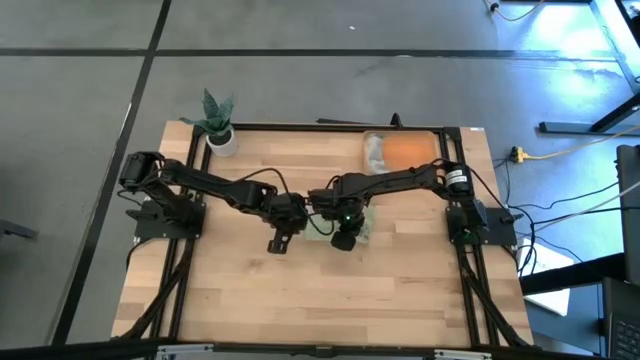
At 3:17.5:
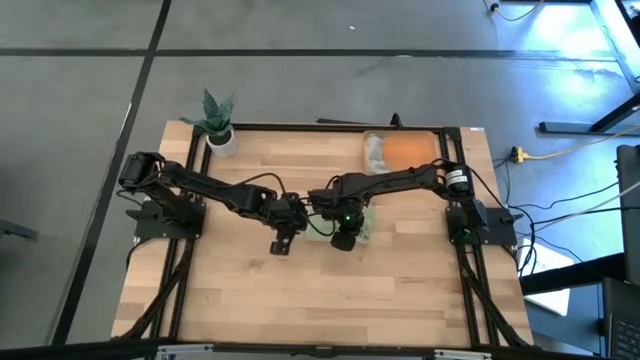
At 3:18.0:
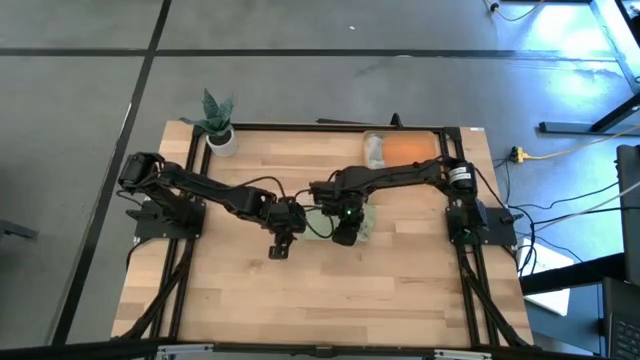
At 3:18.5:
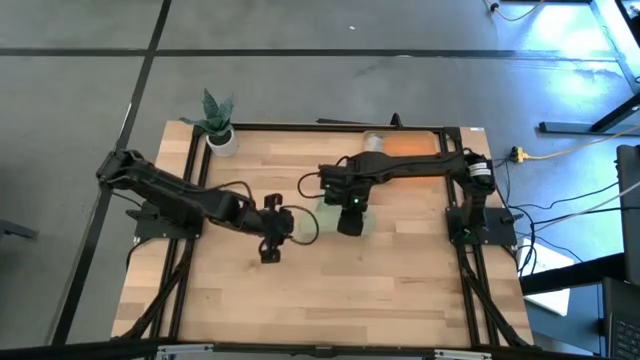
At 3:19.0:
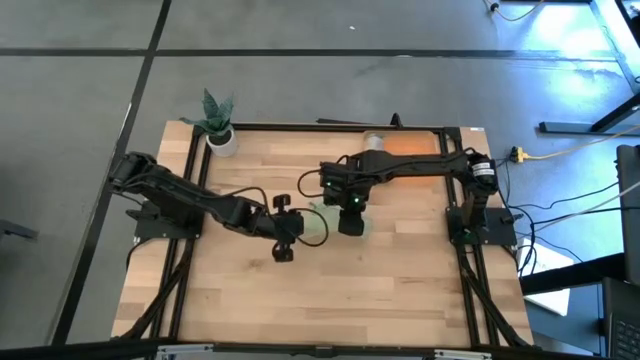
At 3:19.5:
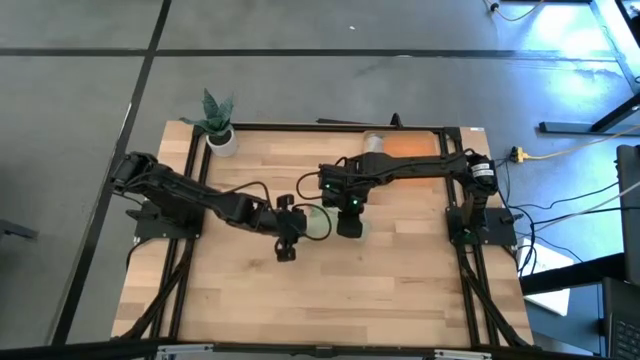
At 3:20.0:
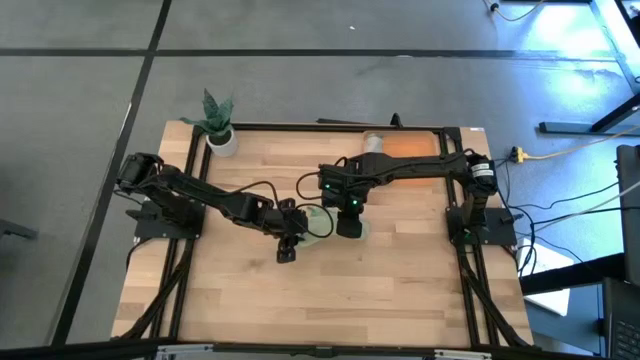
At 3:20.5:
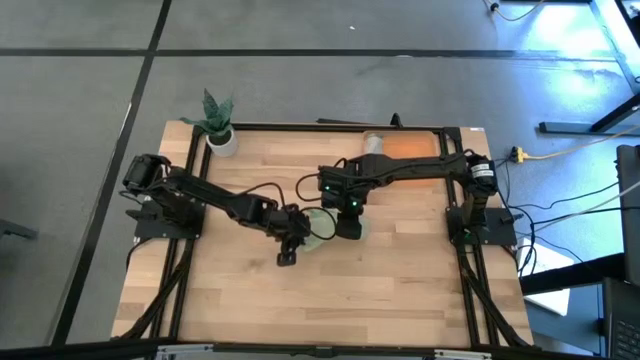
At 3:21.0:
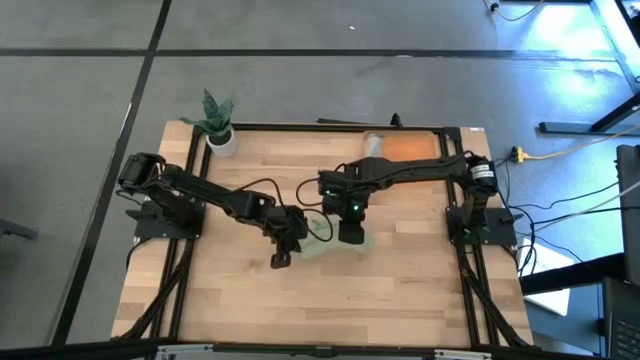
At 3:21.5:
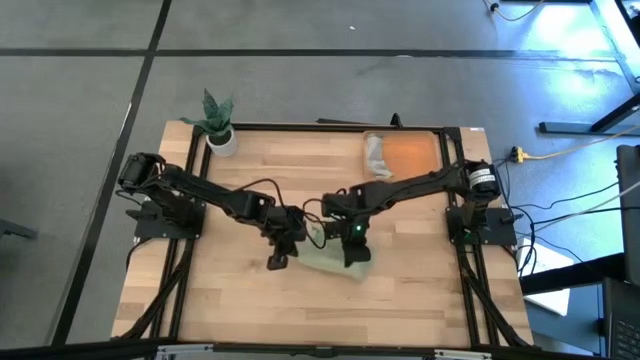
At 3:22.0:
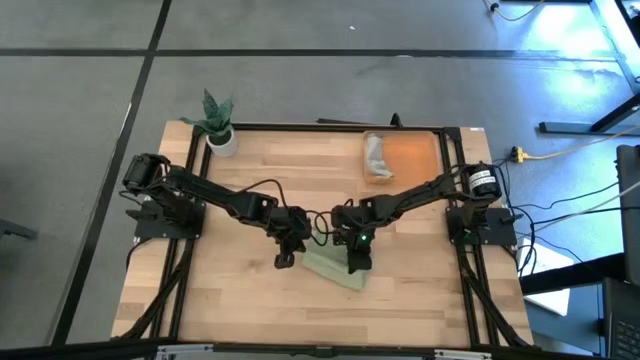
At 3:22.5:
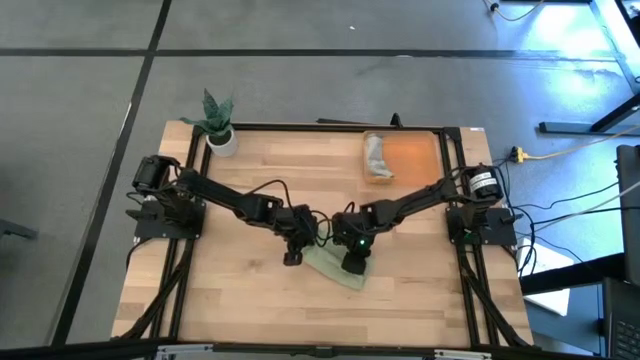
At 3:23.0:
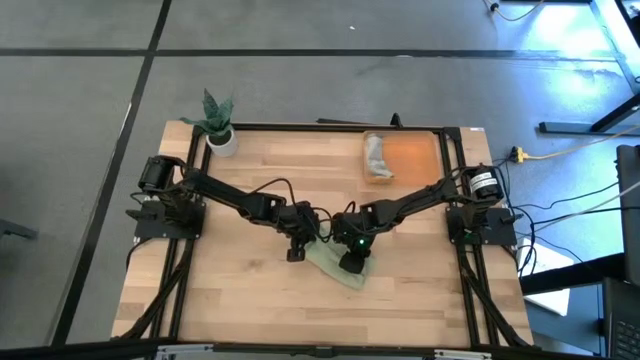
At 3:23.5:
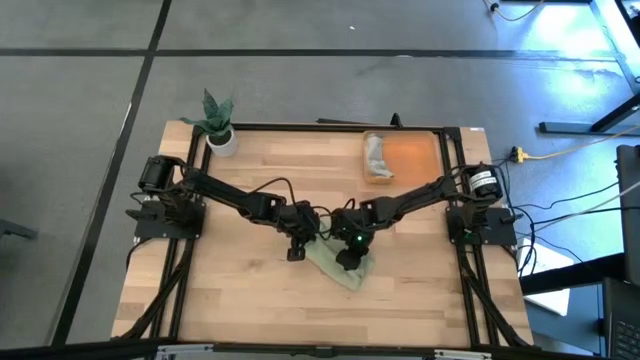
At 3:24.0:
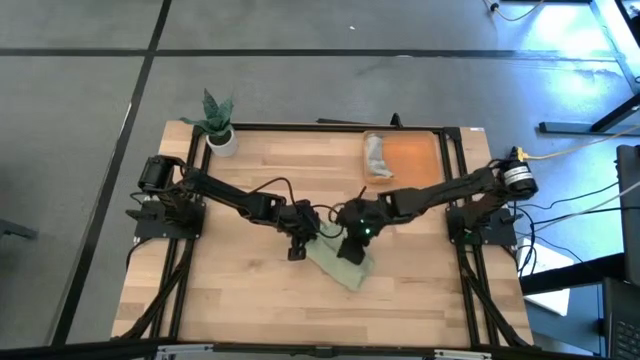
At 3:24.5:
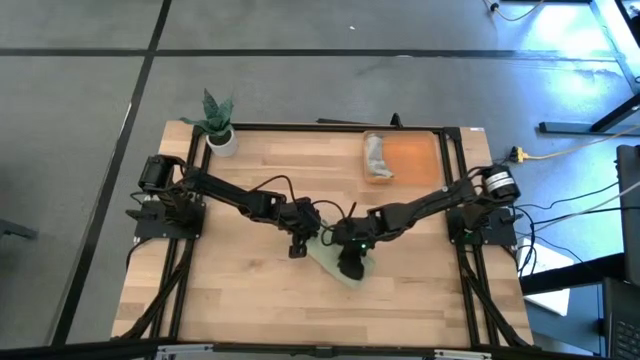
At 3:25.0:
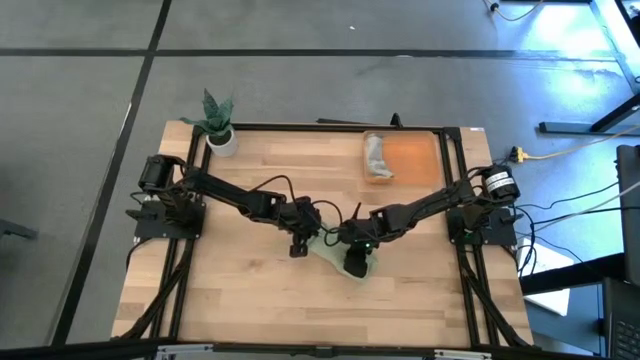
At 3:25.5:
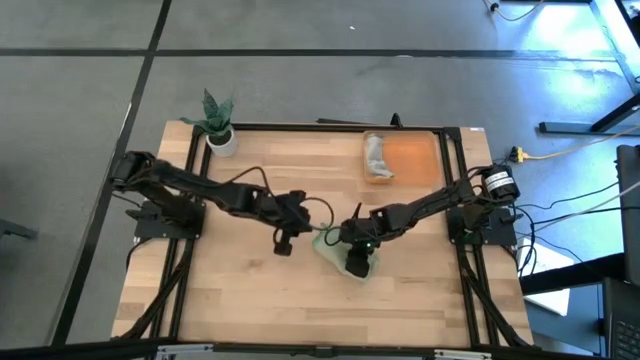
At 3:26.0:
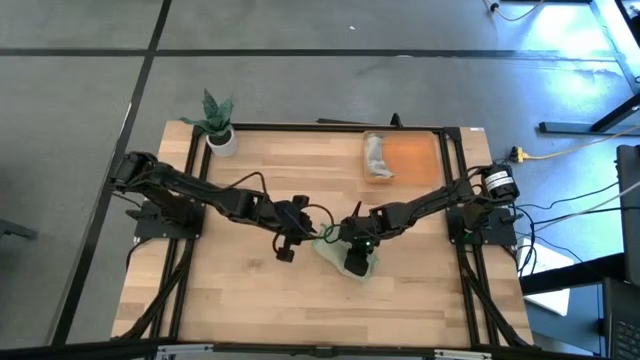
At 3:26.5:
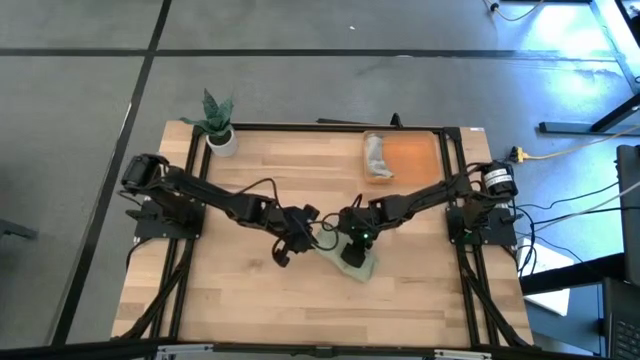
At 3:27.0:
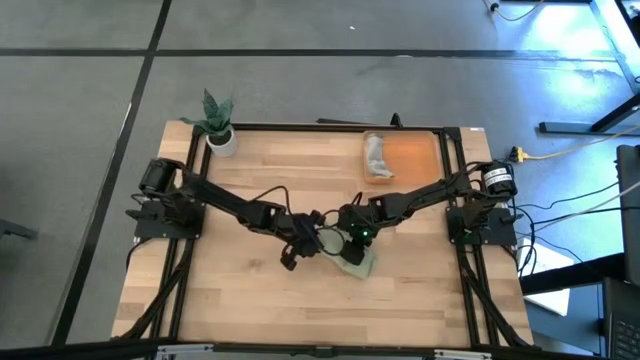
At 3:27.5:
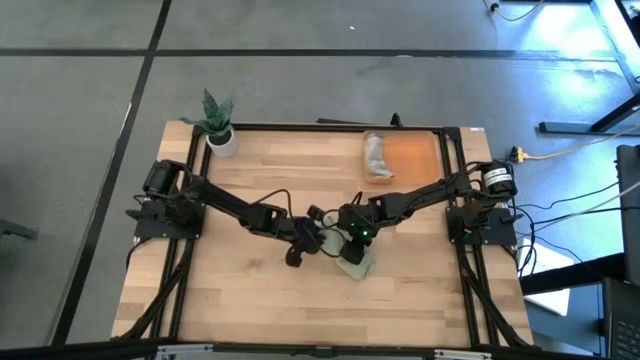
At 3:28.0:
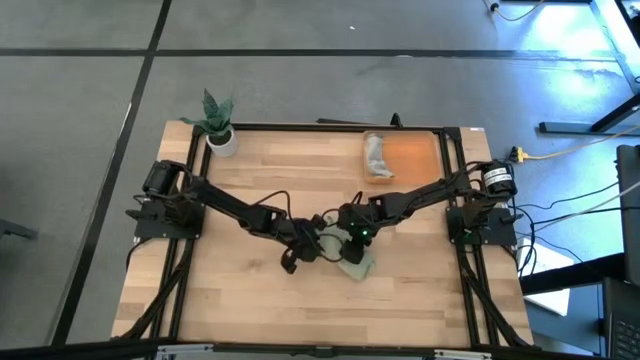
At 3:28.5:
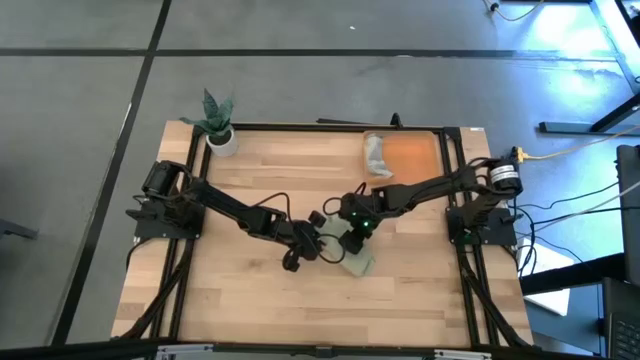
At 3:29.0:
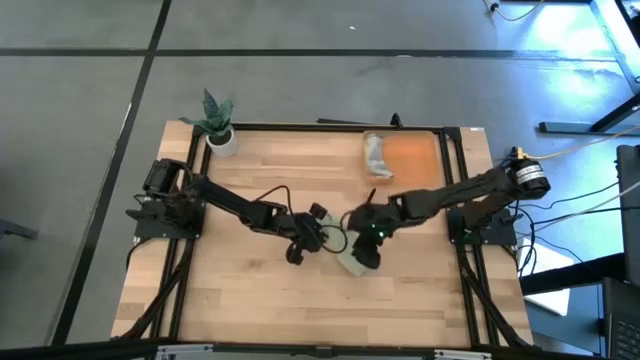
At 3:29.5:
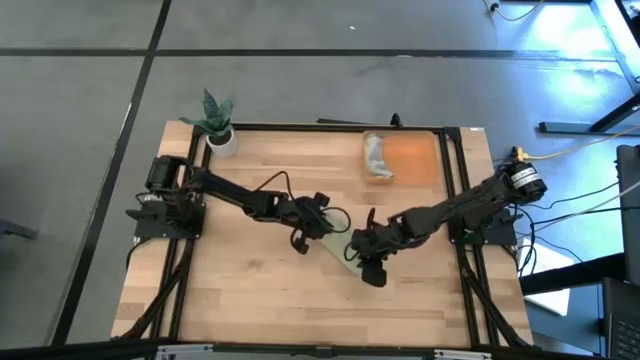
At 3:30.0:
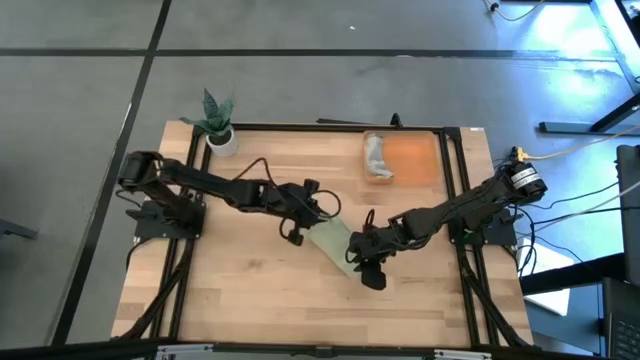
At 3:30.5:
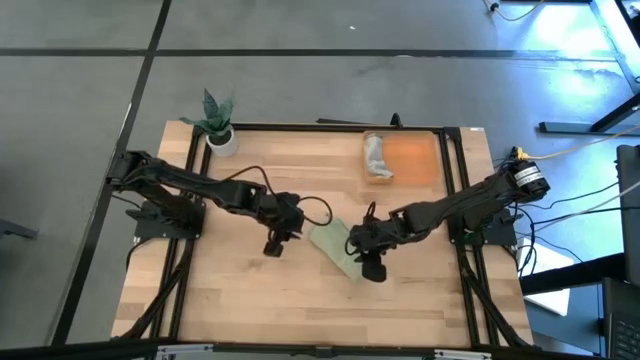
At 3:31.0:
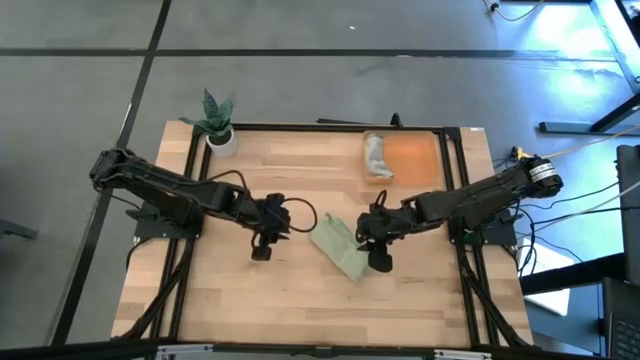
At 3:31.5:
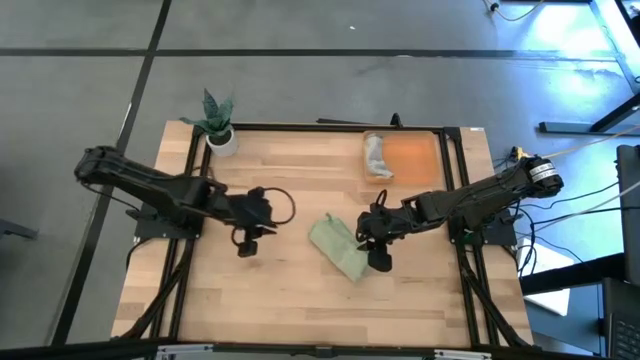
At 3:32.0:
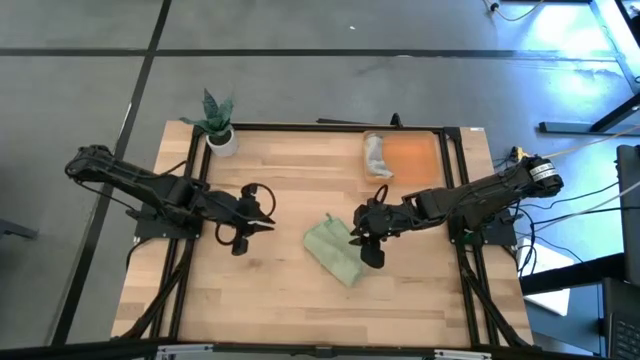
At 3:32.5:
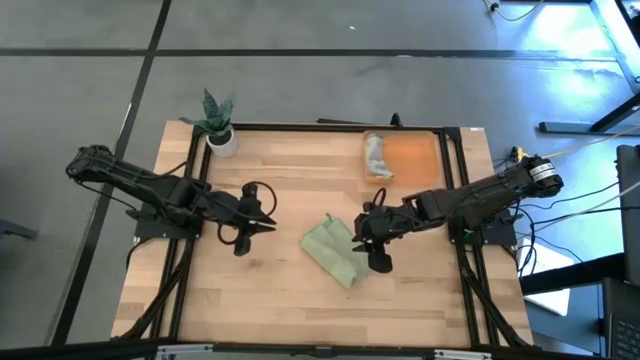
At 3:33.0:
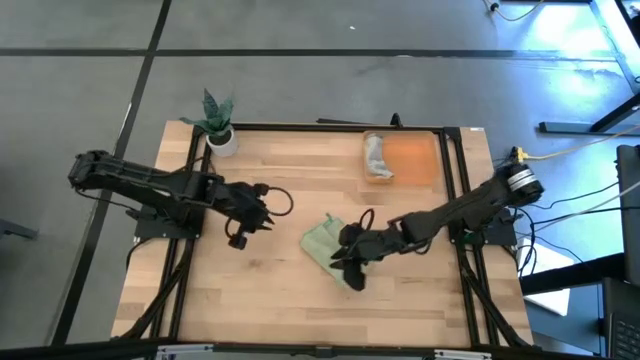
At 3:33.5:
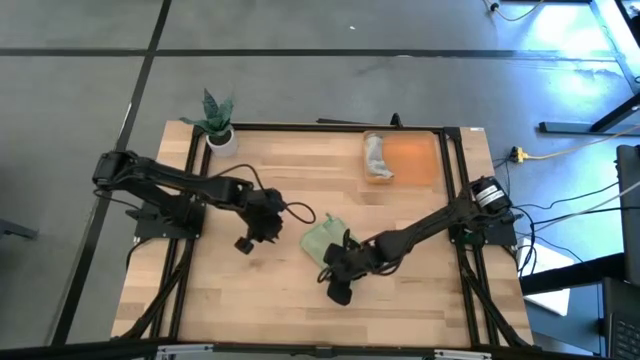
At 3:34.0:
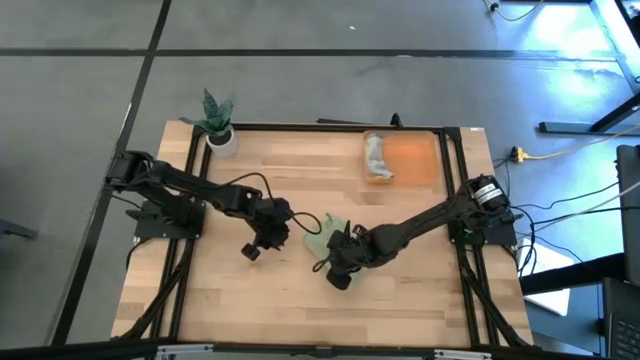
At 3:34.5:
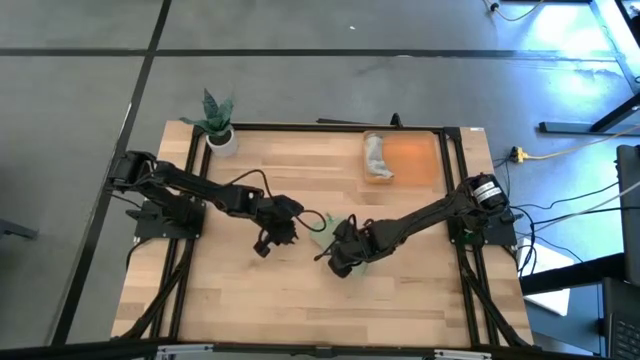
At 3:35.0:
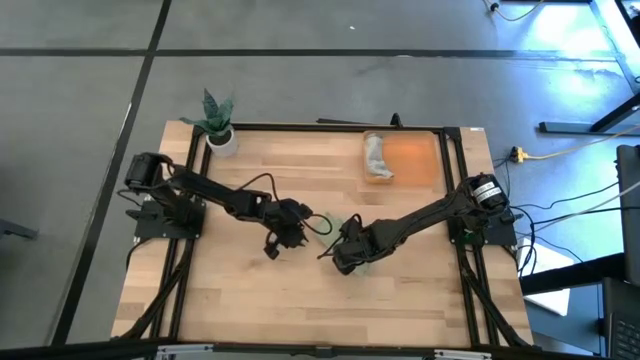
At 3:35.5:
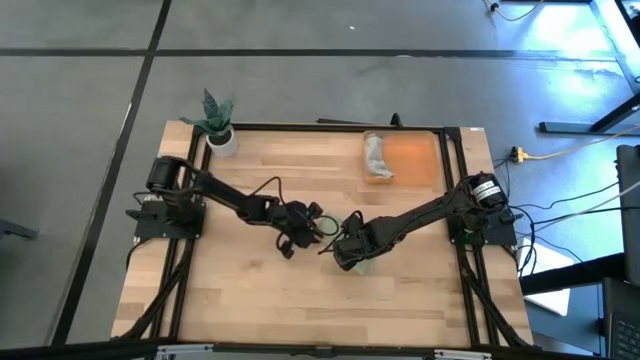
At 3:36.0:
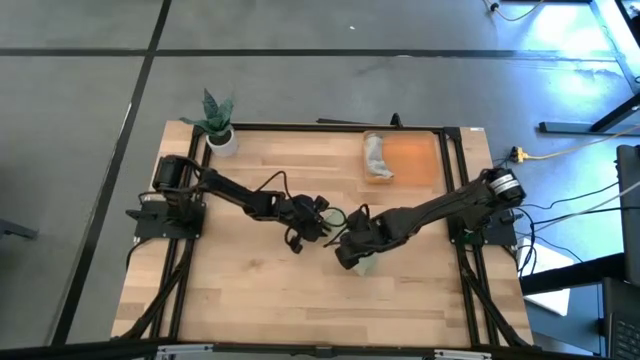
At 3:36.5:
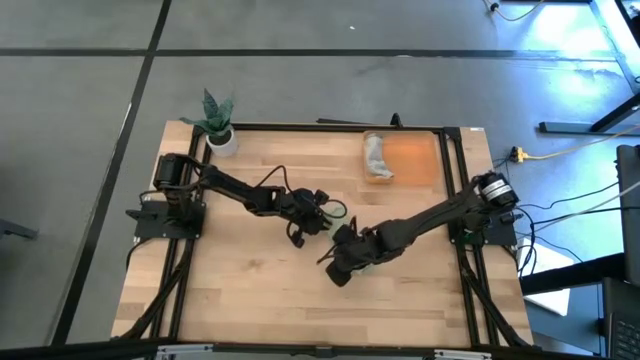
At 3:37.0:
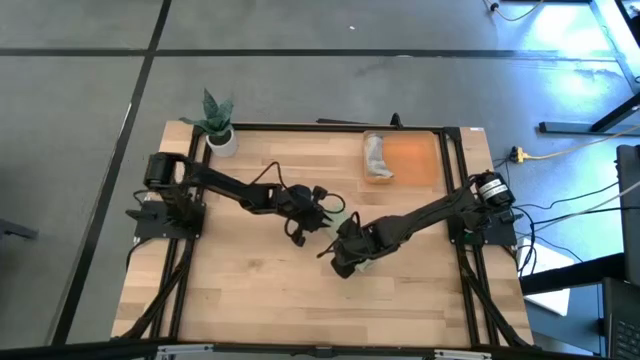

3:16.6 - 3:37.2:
Task: Roll microfiber towels into tight, uniform cylinder then place into a basket
Roll the green microfiber towel

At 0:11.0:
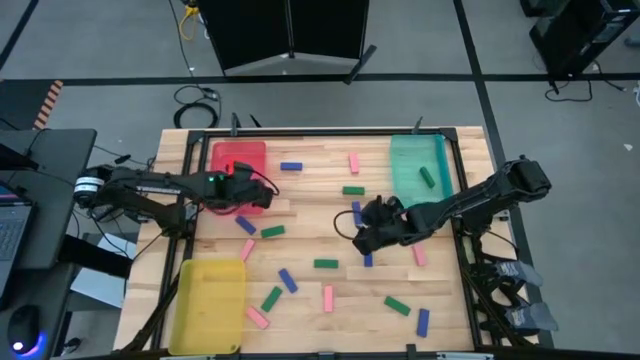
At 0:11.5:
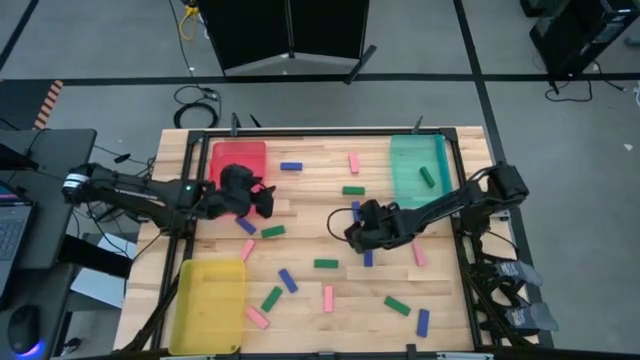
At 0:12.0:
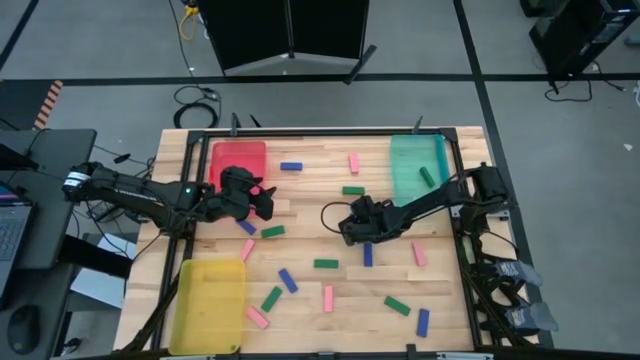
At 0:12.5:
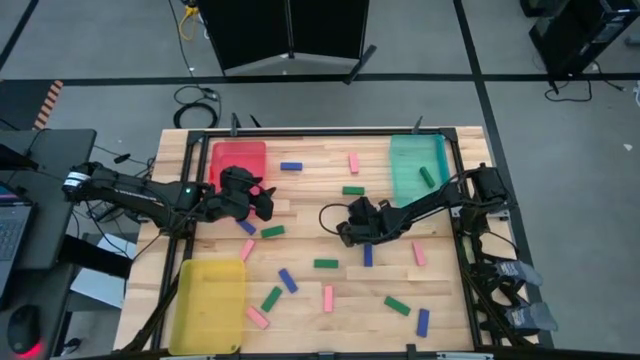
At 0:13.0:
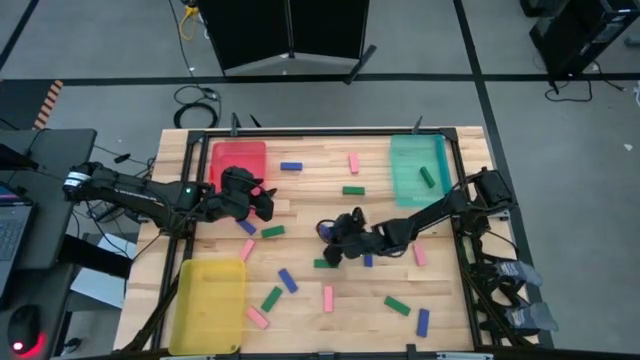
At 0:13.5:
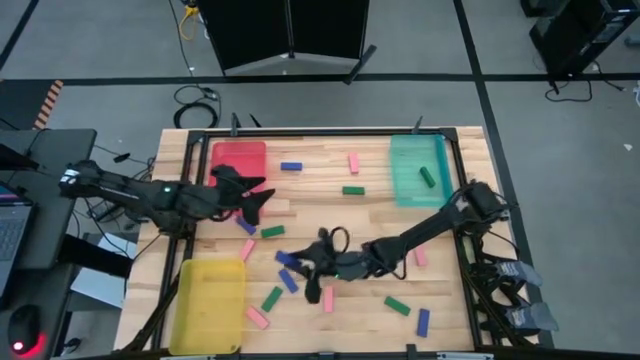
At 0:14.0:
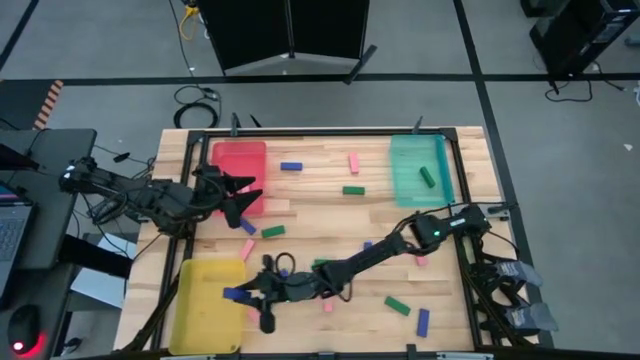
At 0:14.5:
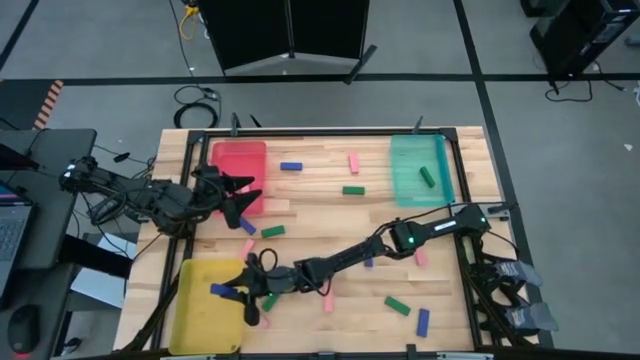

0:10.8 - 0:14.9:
Task: Sort blocks
Put the blue block into the yellow bin
